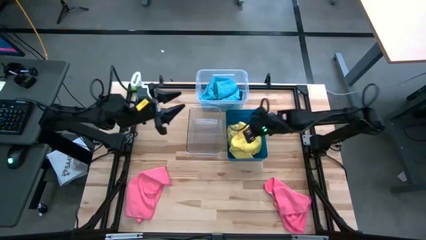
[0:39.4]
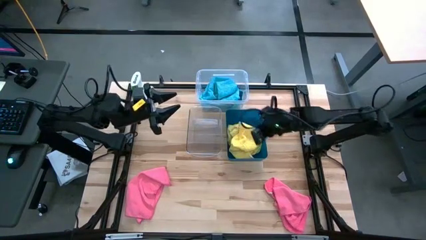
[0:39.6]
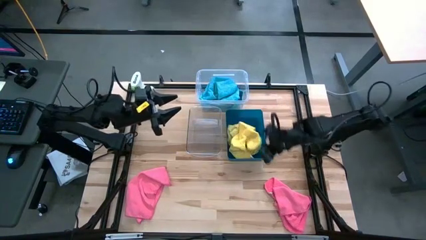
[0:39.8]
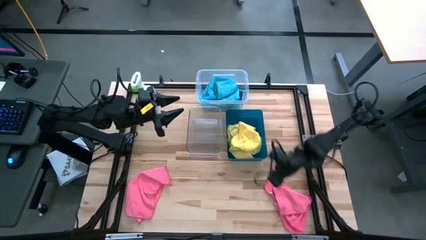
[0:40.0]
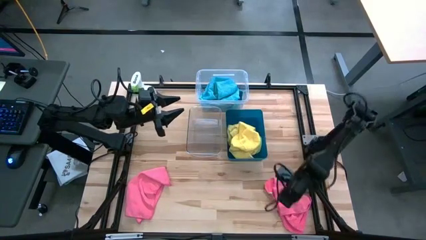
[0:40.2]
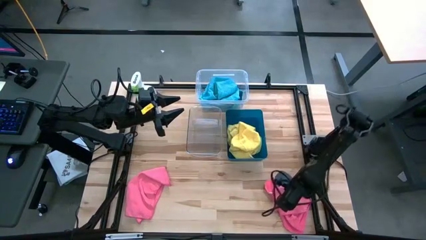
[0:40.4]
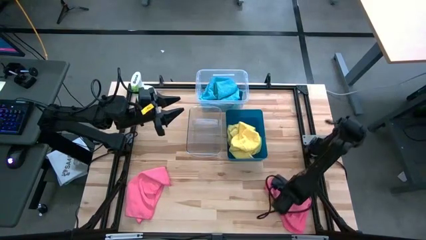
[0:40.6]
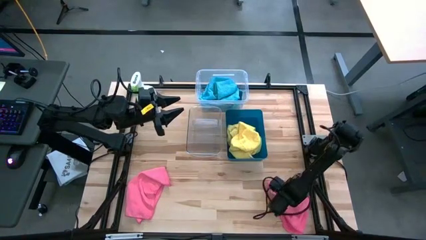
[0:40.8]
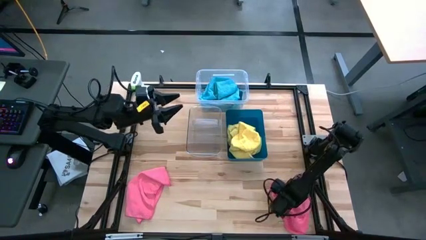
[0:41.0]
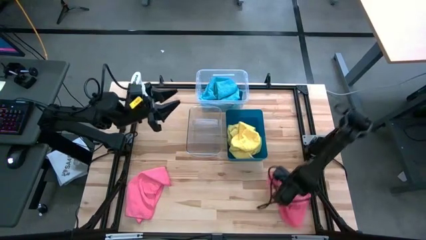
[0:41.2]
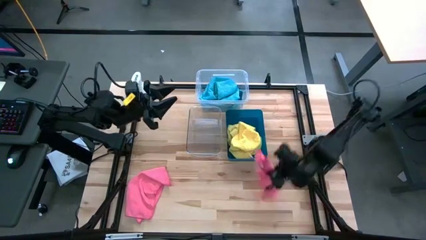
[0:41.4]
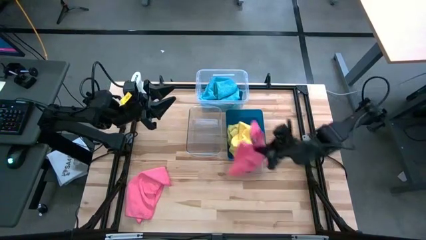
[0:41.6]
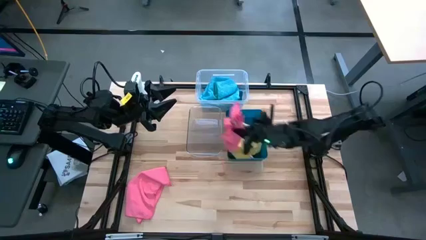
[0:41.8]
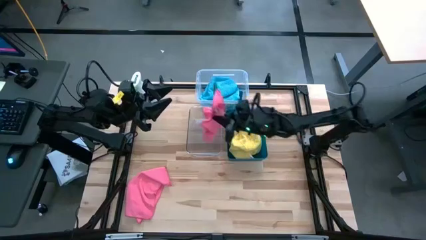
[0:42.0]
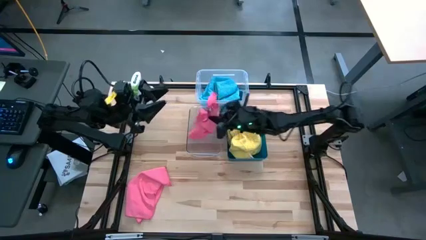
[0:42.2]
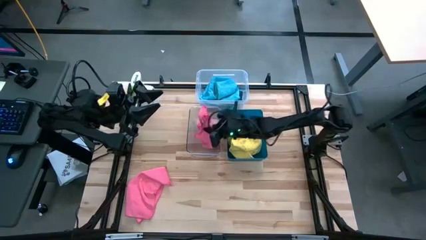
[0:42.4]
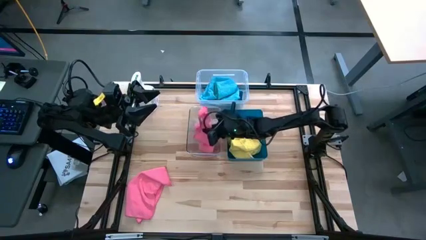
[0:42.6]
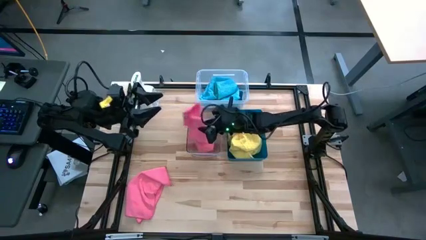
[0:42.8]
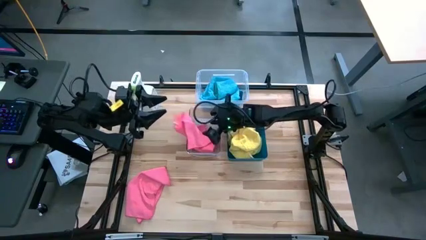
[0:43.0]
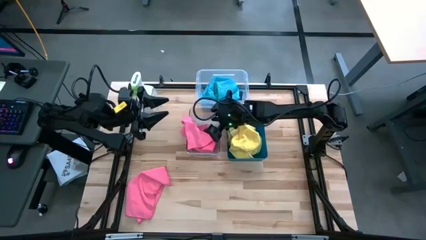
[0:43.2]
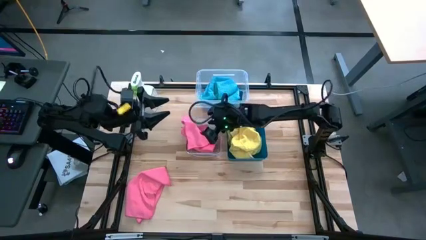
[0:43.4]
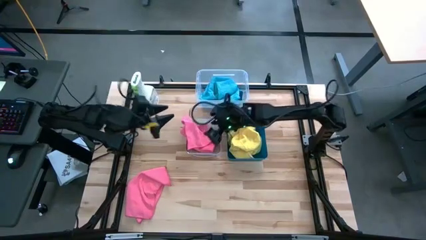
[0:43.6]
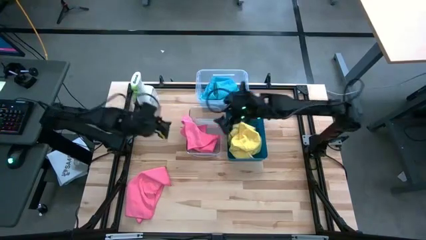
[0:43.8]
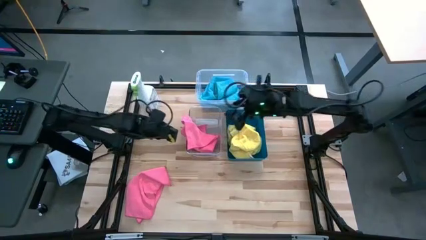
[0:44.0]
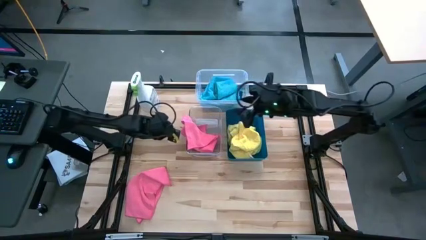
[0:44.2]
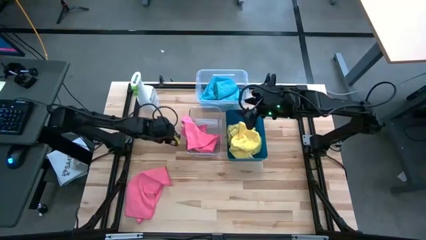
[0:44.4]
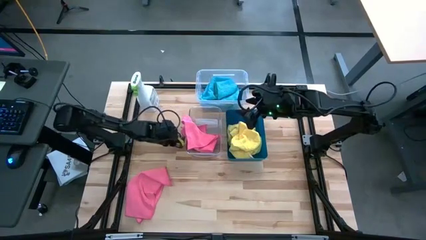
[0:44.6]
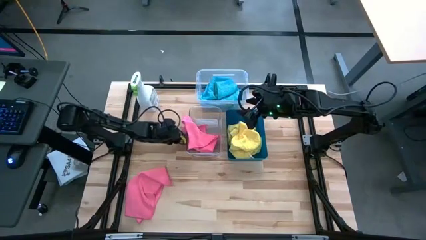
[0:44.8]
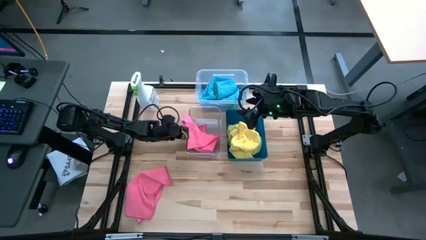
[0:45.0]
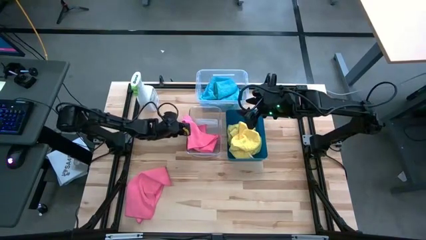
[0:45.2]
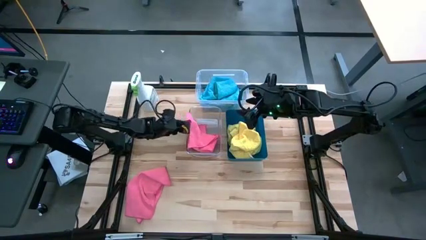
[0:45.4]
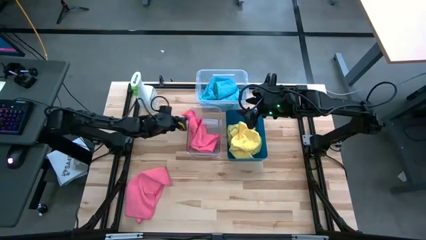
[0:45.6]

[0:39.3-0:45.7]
Task: Sort microfiber towel by color & place in baskets
Put the right pink towel into bottom transparent bin

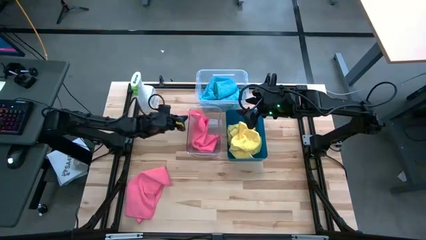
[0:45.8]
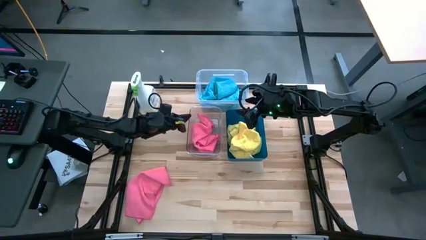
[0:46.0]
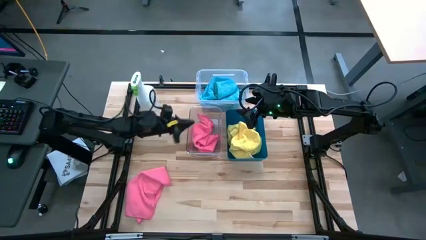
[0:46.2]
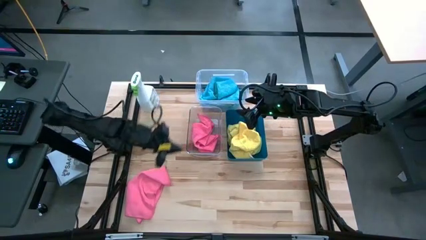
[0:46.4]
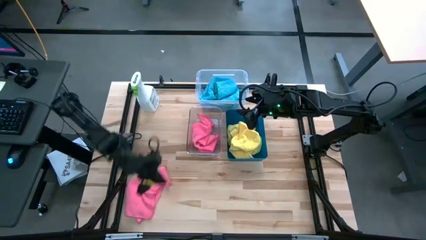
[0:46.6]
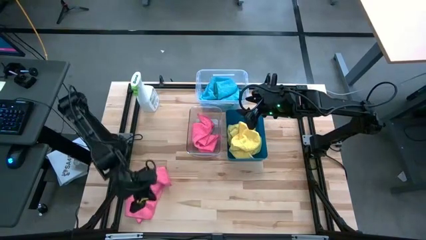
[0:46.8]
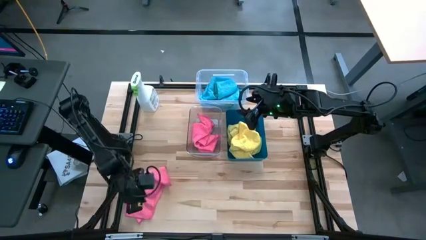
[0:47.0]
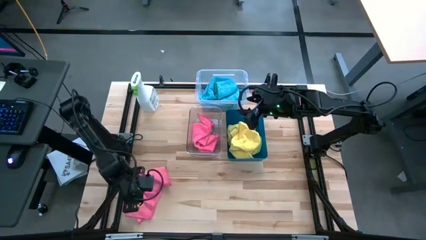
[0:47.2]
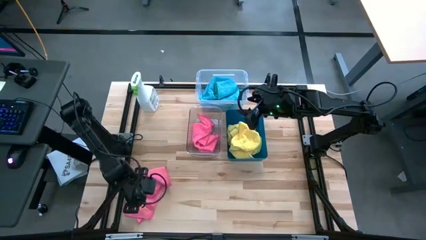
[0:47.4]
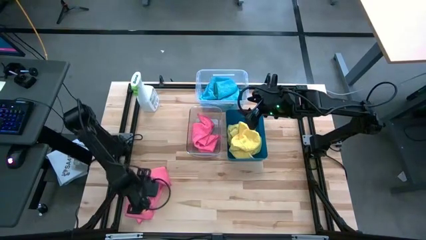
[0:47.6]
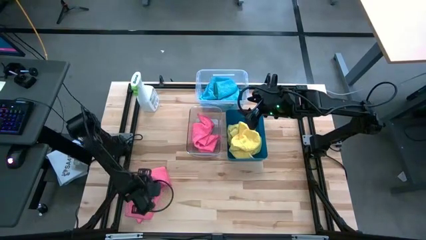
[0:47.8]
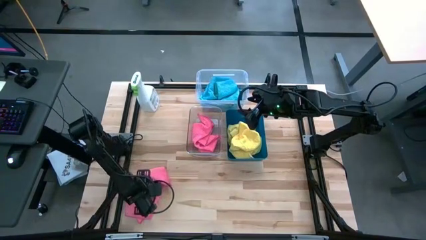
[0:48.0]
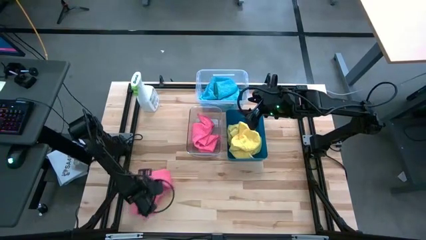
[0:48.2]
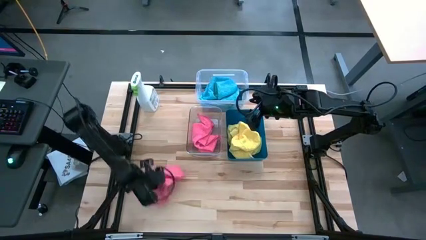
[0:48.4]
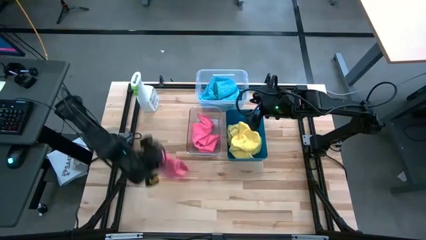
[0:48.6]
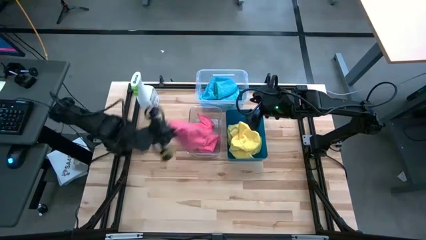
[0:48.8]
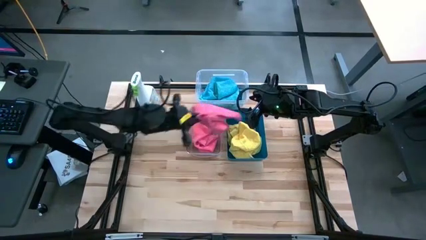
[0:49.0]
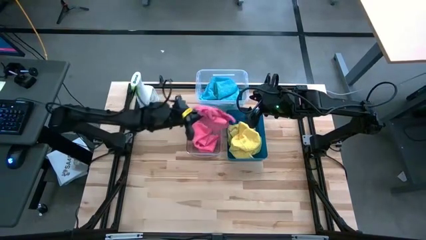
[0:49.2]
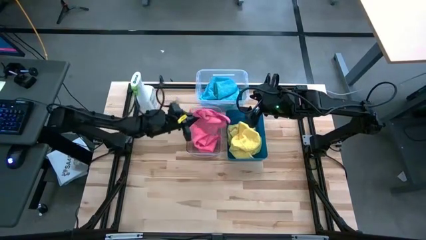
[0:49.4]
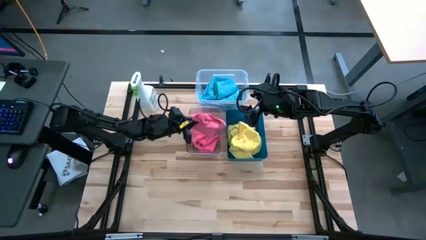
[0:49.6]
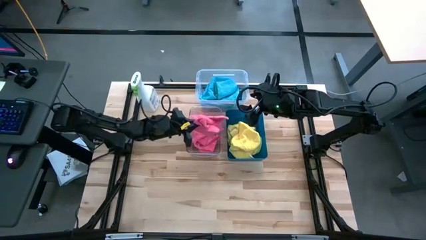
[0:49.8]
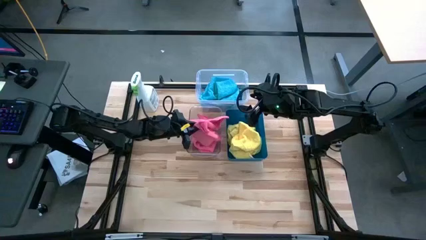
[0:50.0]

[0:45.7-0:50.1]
Put the pink towel in the transparent bin

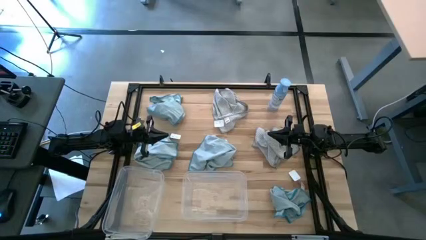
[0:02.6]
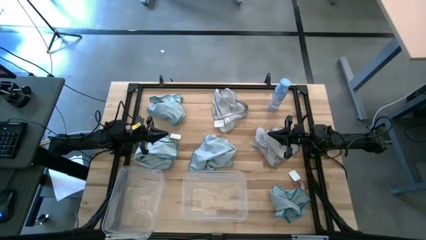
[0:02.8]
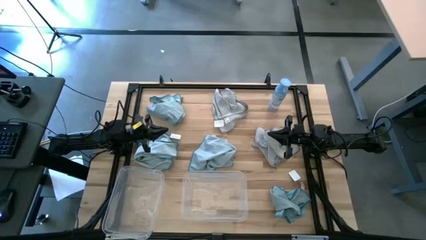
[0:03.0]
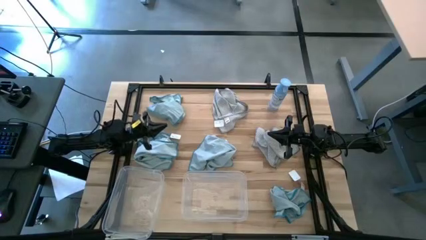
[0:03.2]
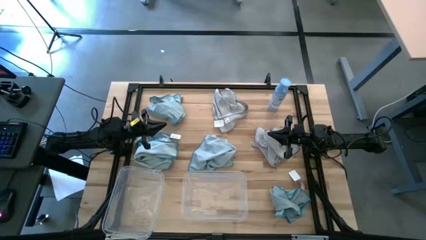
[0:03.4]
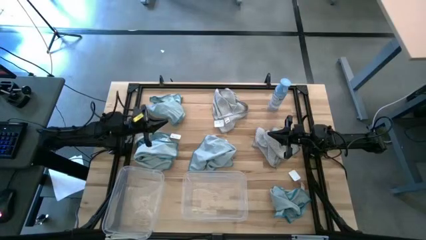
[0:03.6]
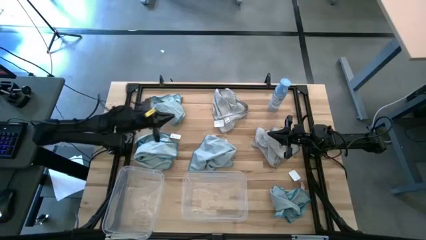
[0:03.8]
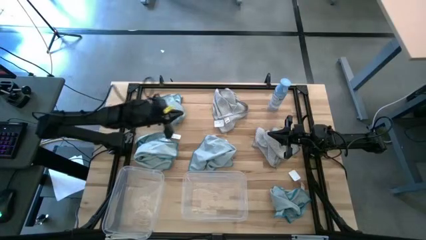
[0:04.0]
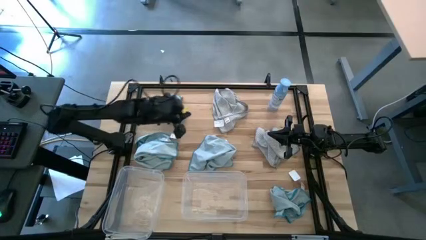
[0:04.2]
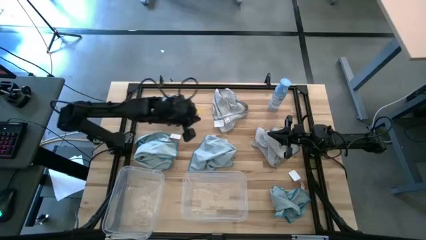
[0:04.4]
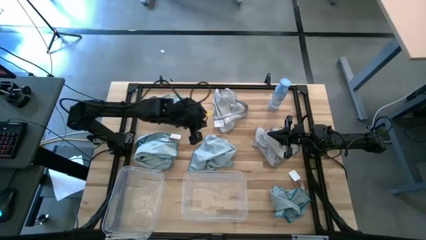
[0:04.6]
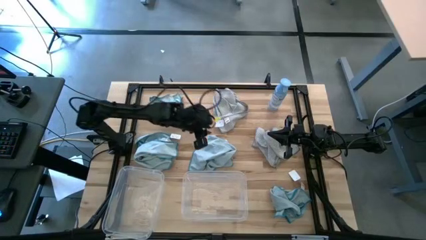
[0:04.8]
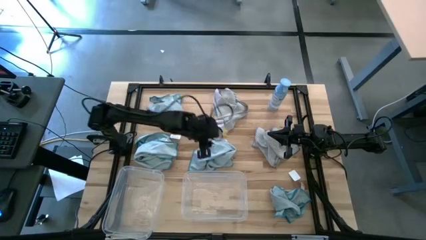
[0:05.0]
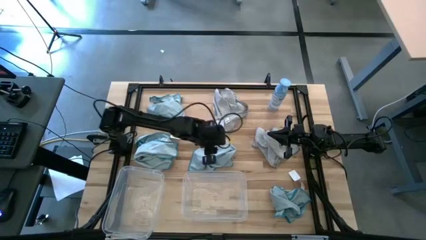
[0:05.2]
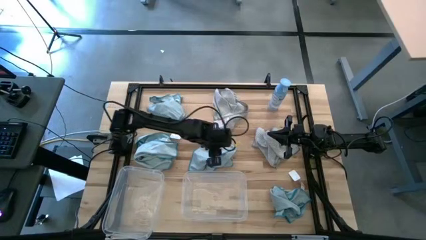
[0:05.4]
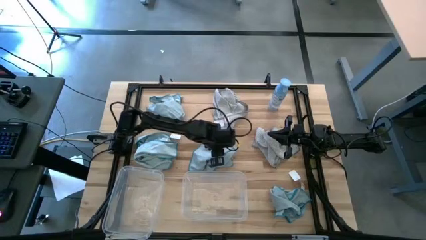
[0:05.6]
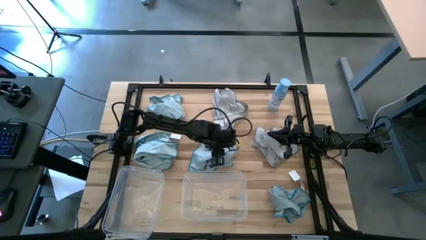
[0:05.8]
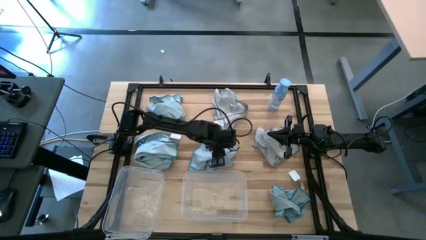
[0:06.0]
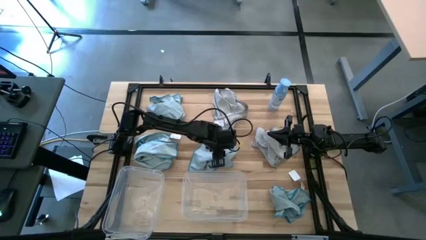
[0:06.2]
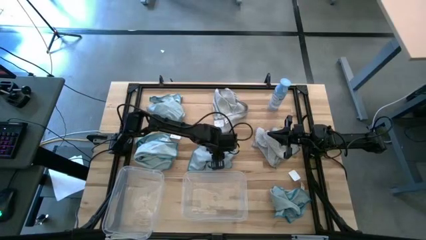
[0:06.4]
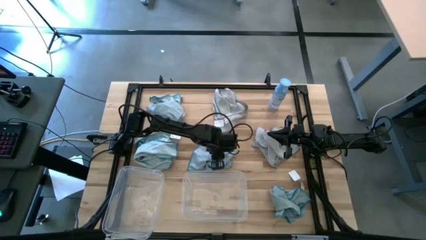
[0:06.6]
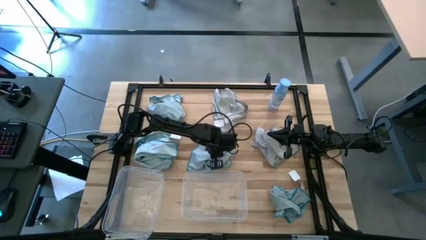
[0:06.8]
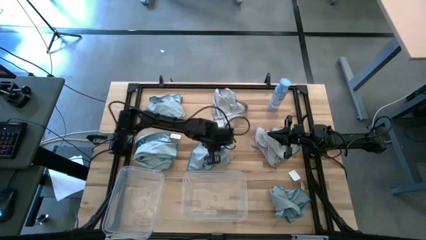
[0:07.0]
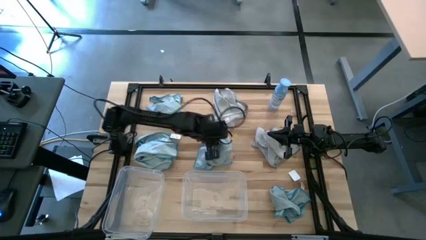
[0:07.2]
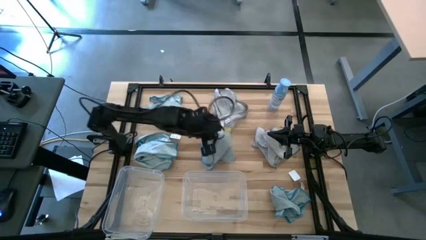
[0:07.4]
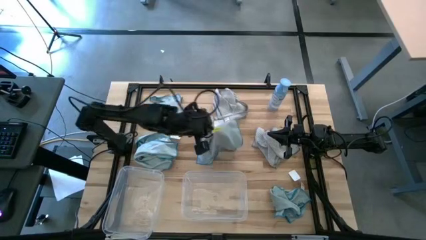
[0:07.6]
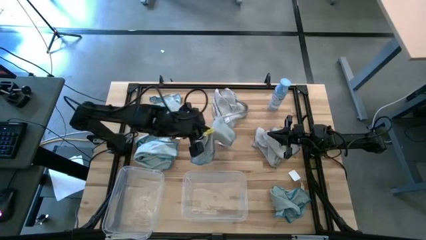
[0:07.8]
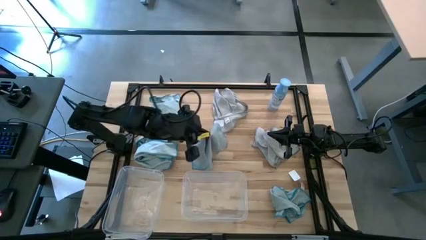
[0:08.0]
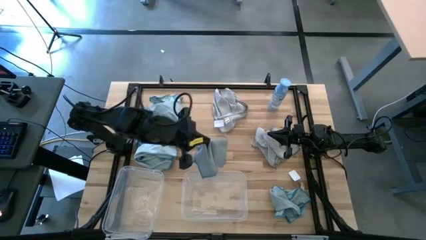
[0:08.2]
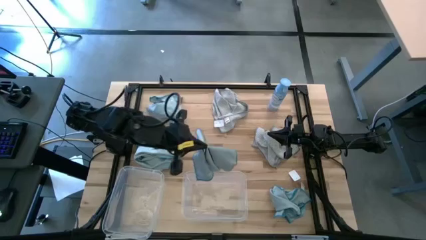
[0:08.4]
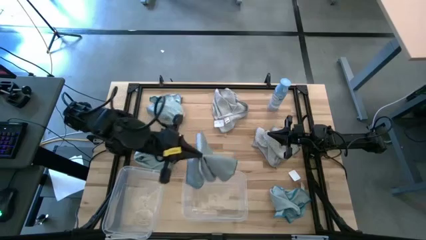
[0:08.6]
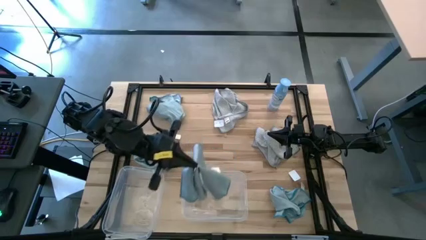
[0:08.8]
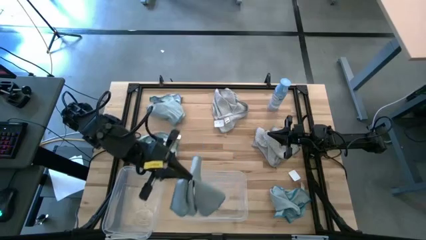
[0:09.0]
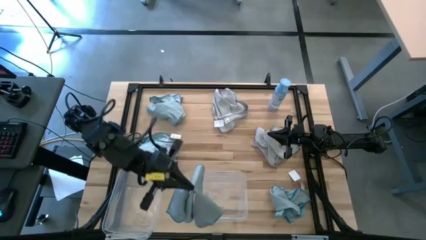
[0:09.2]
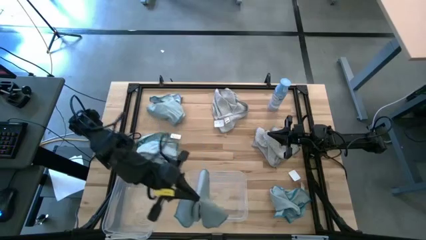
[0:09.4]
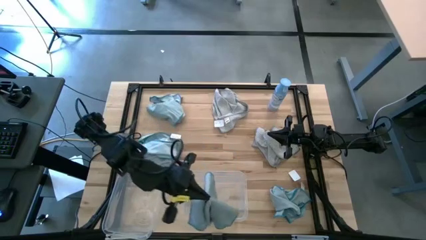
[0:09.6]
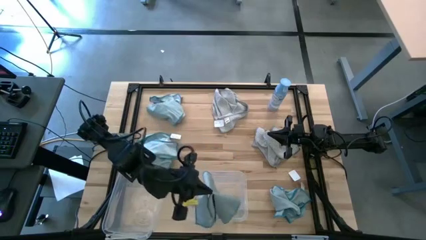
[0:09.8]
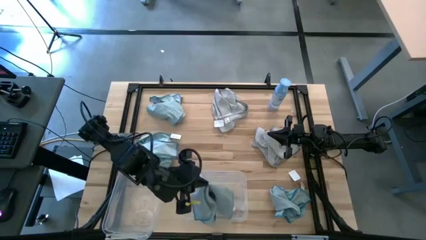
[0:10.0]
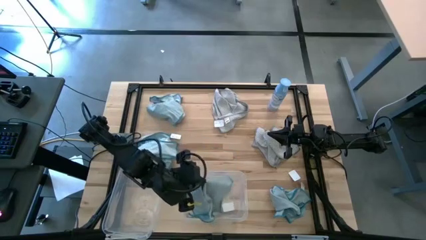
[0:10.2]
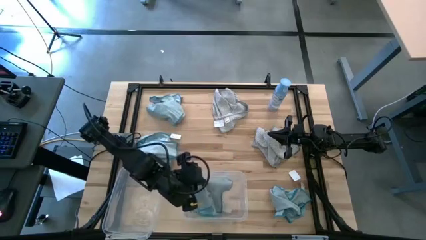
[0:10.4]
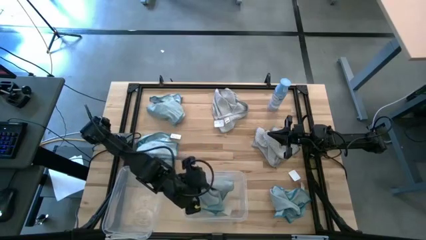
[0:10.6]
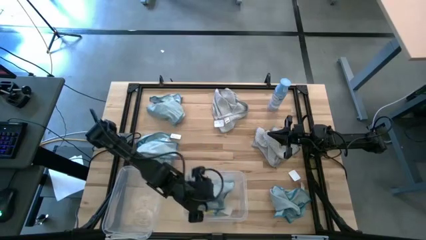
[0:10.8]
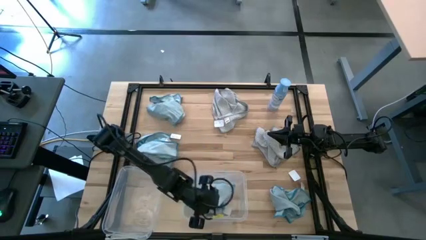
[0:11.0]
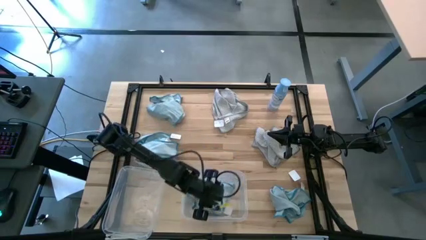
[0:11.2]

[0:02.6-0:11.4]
Task: Sort microfiber towel by color & place in baskets
Put the middle blue towel into the right transparent bin
